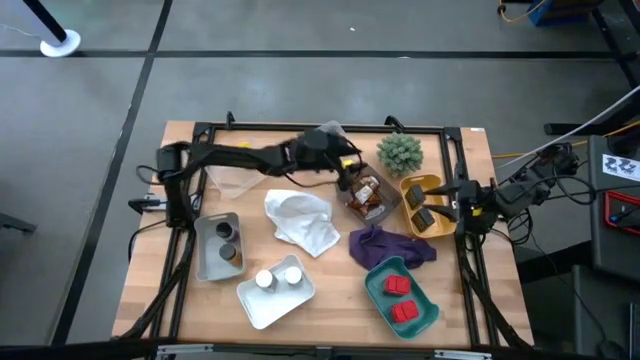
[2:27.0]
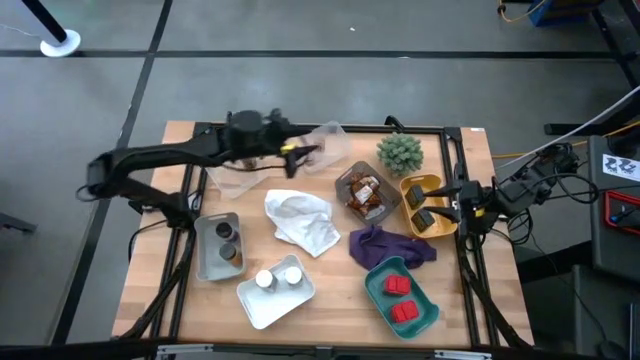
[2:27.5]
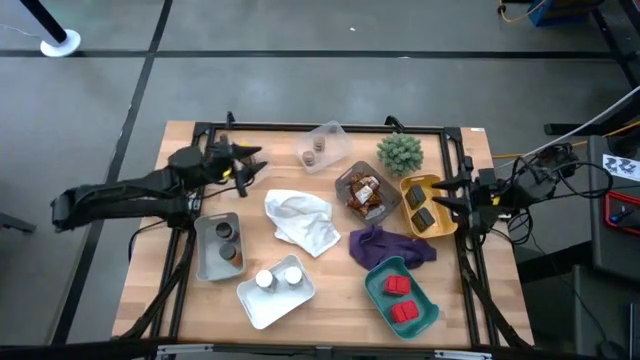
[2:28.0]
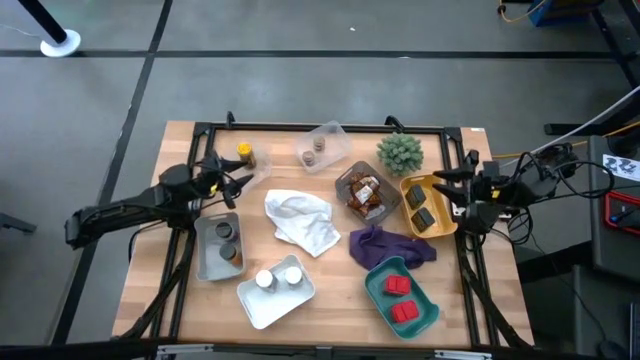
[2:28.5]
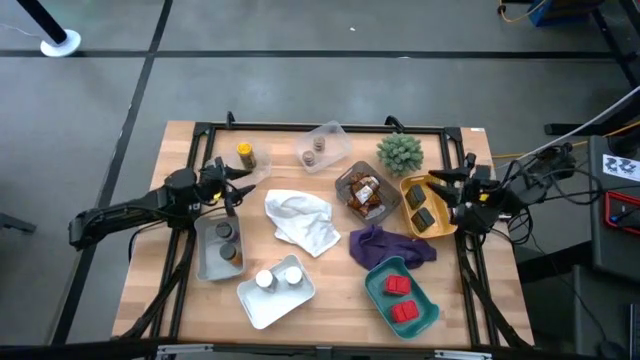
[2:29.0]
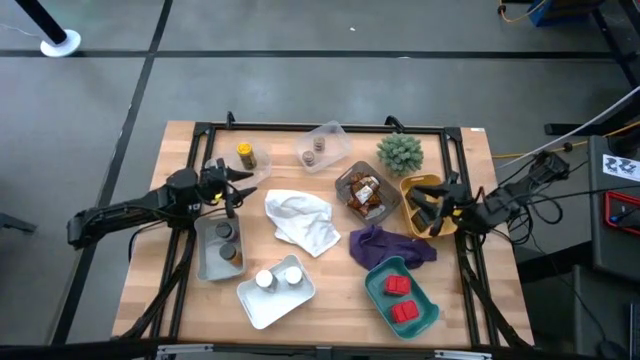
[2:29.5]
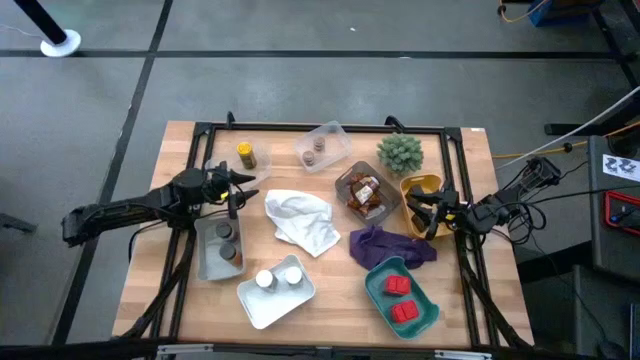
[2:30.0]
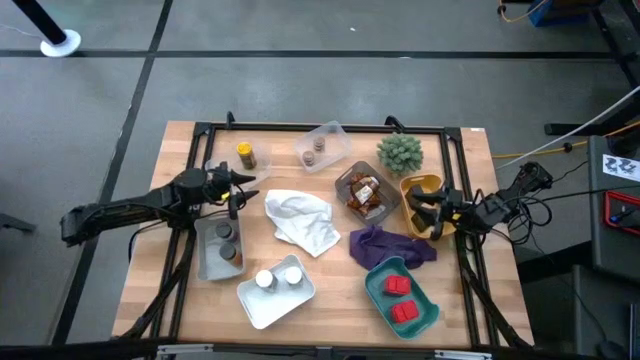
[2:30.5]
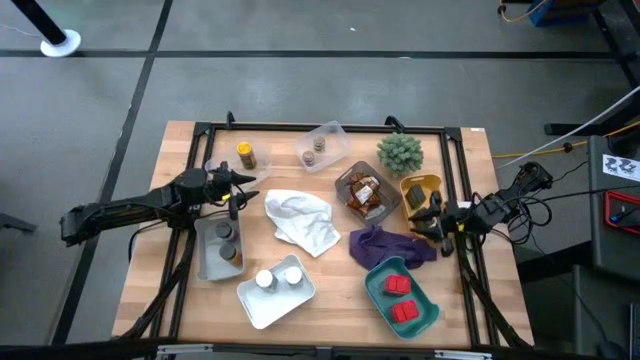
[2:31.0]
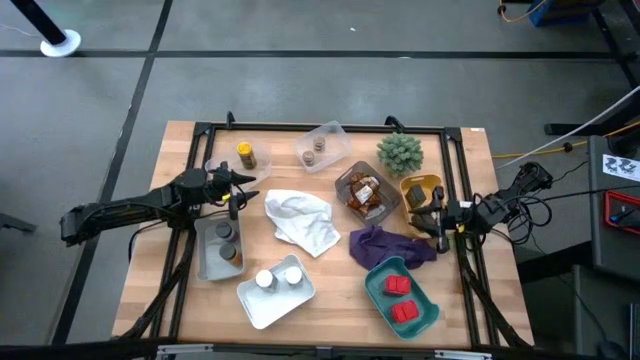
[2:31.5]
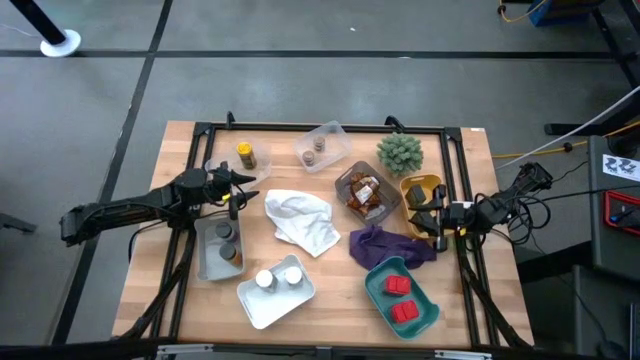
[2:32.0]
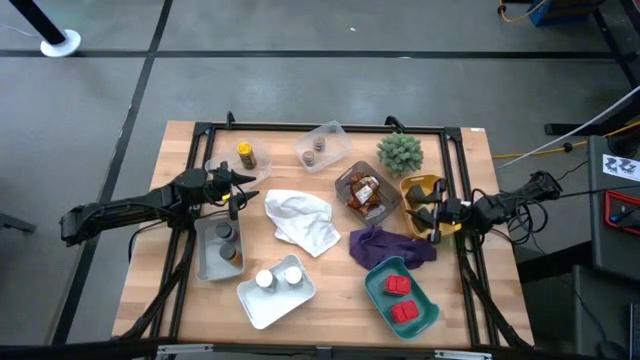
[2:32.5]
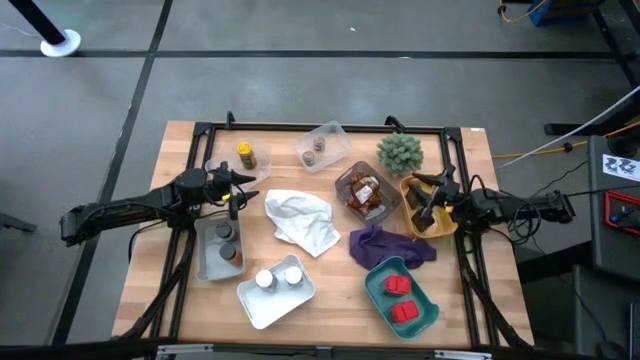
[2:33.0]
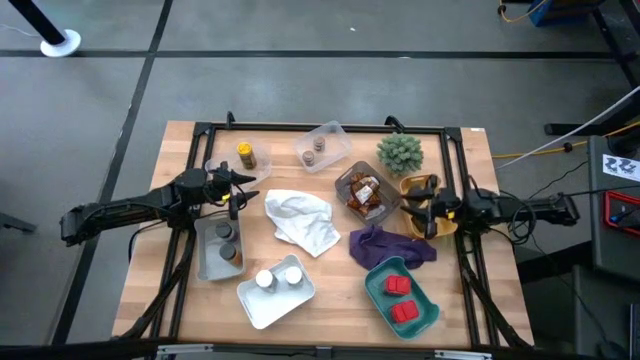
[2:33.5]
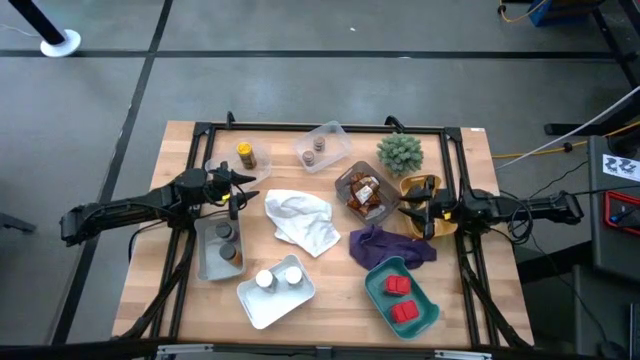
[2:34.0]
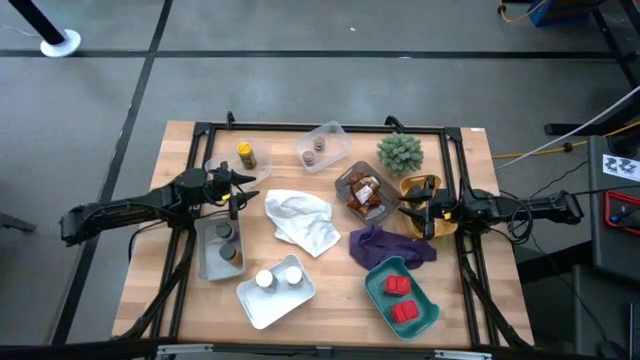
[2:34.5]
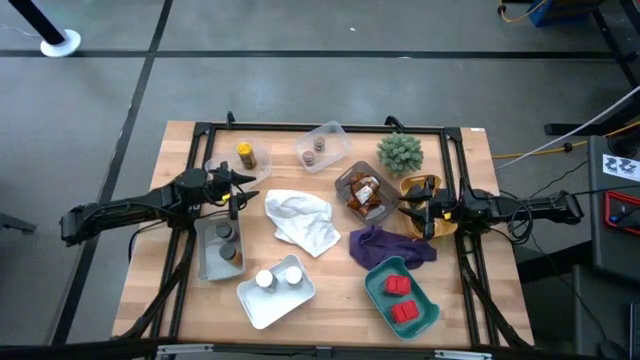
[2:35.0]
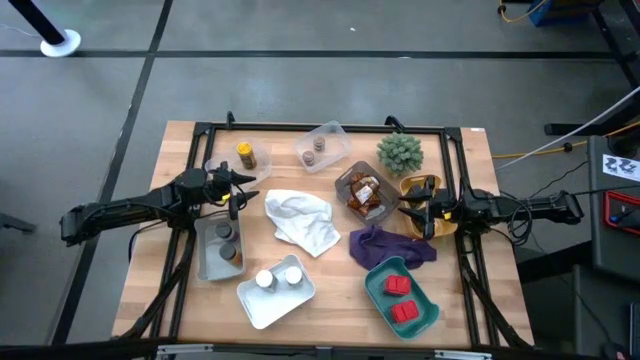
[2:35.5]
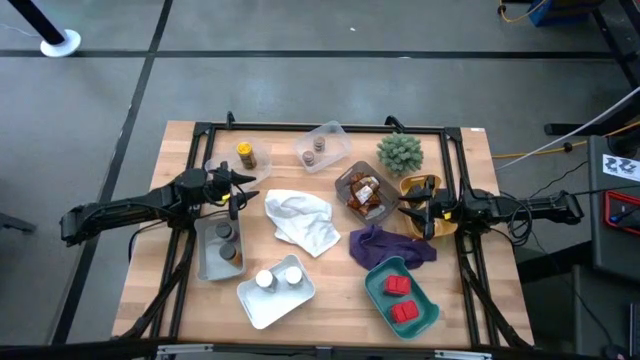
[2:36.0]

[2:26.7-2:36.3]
Task: Sort spices by type
Return to Home Position
